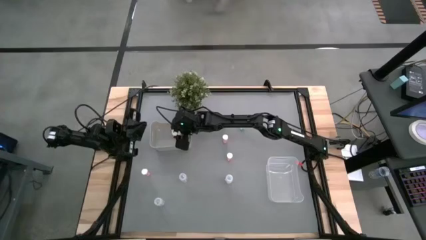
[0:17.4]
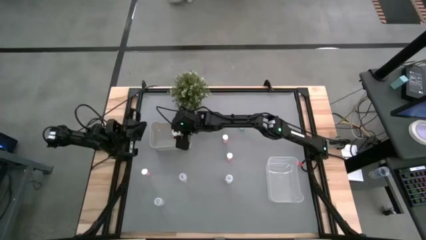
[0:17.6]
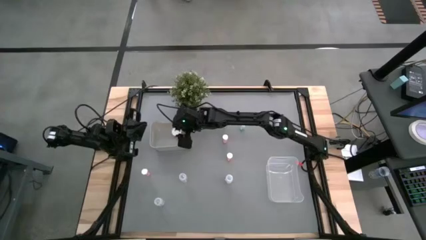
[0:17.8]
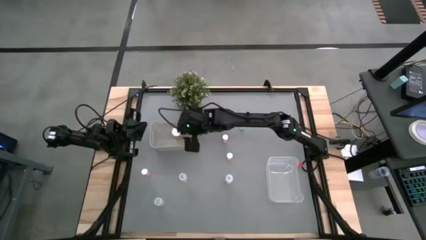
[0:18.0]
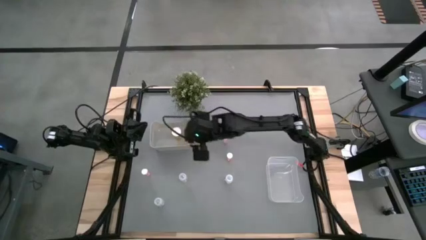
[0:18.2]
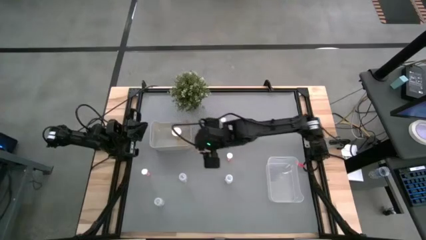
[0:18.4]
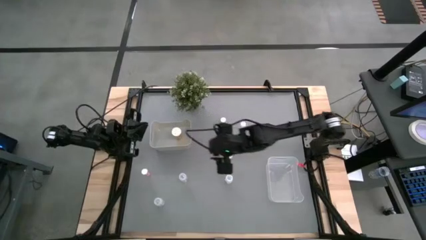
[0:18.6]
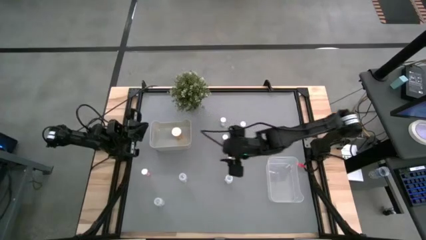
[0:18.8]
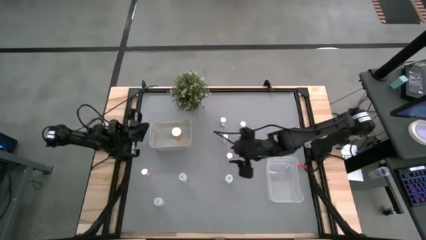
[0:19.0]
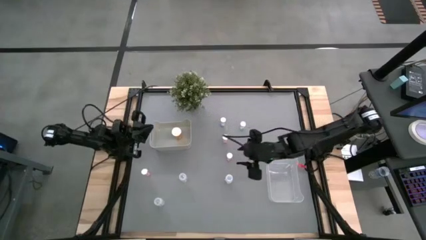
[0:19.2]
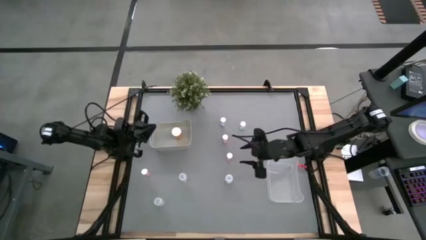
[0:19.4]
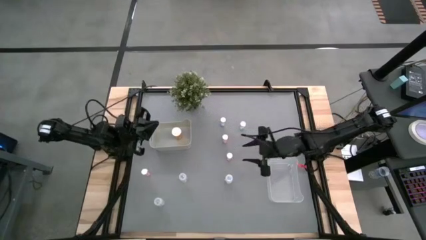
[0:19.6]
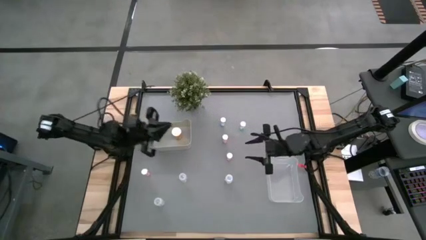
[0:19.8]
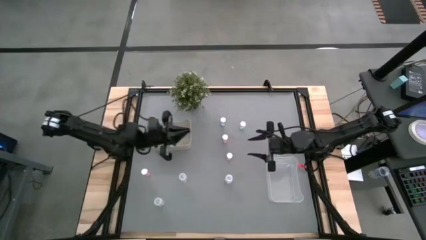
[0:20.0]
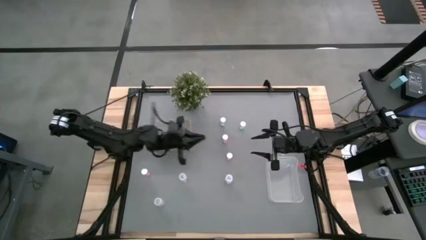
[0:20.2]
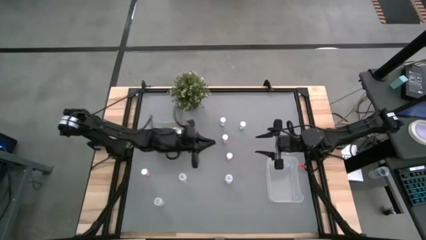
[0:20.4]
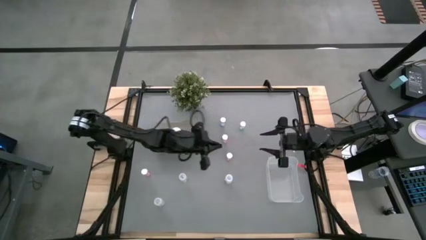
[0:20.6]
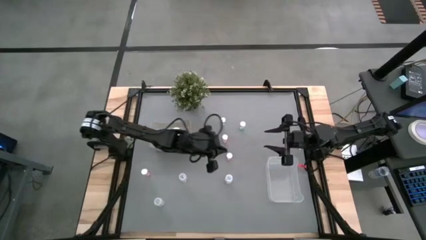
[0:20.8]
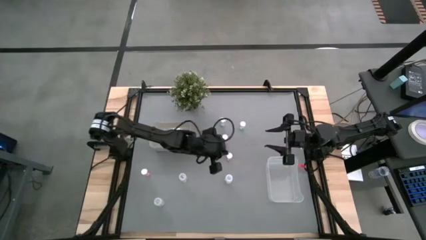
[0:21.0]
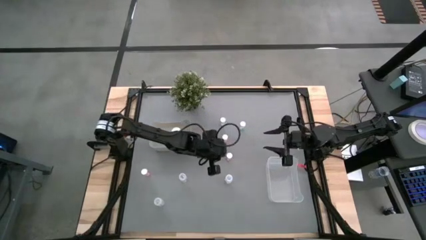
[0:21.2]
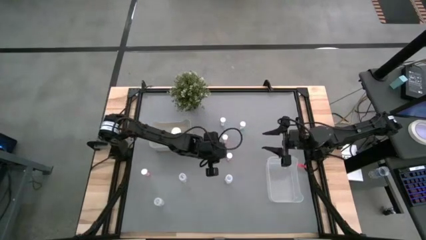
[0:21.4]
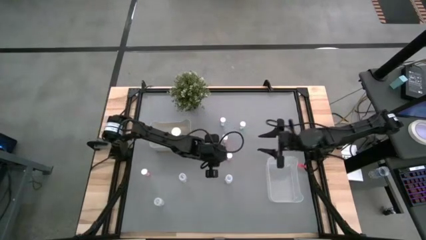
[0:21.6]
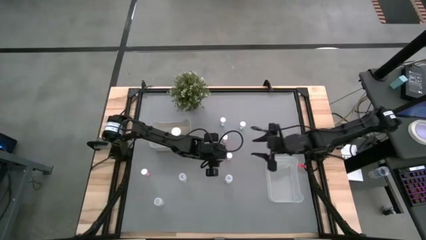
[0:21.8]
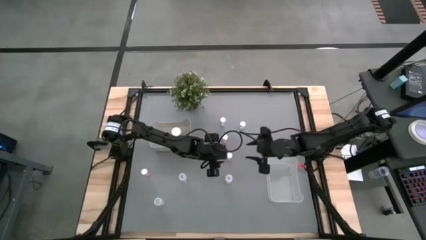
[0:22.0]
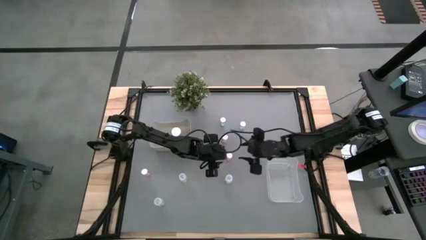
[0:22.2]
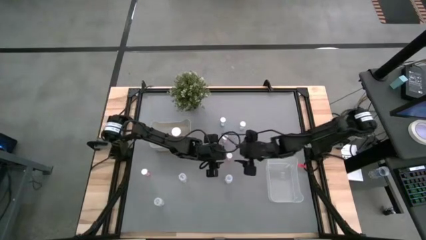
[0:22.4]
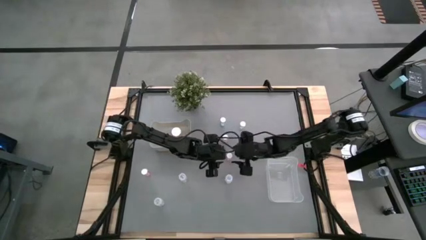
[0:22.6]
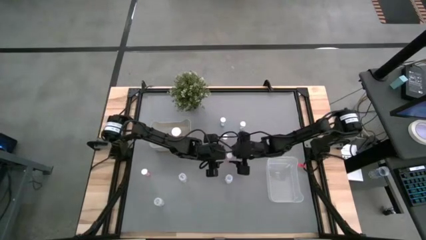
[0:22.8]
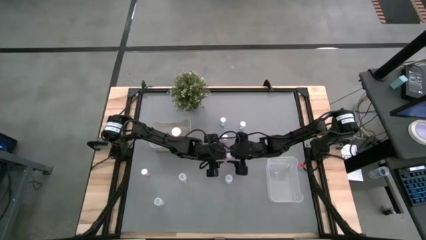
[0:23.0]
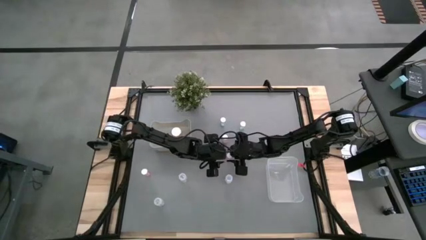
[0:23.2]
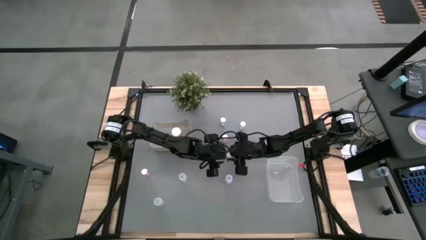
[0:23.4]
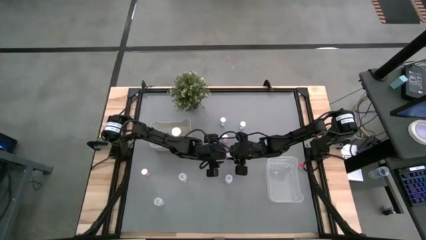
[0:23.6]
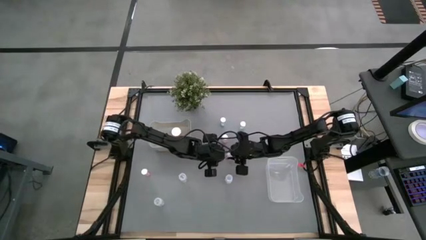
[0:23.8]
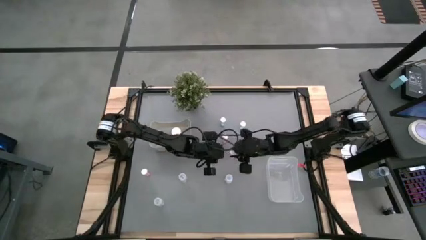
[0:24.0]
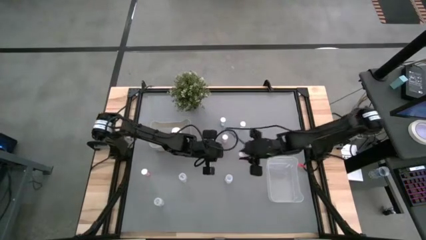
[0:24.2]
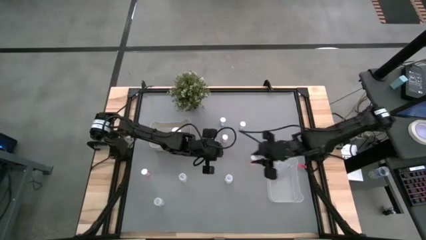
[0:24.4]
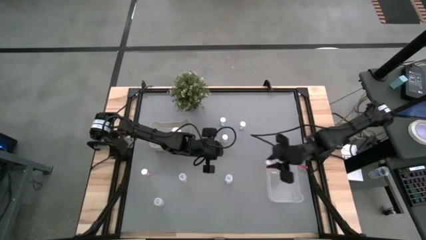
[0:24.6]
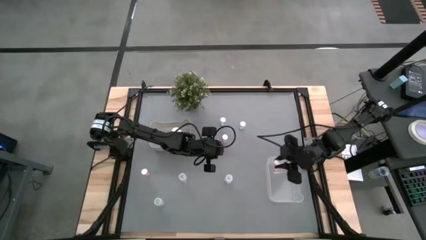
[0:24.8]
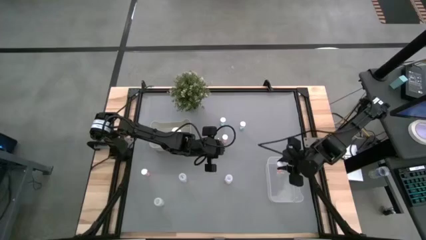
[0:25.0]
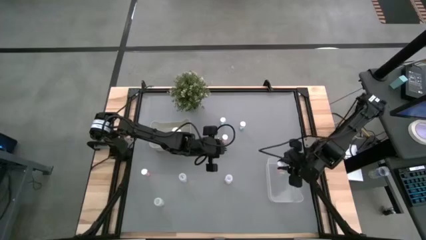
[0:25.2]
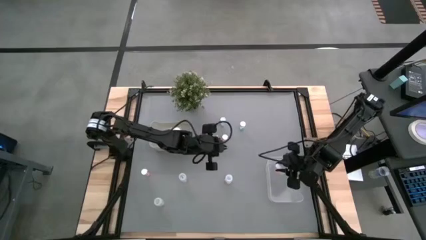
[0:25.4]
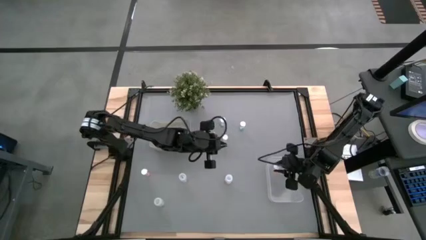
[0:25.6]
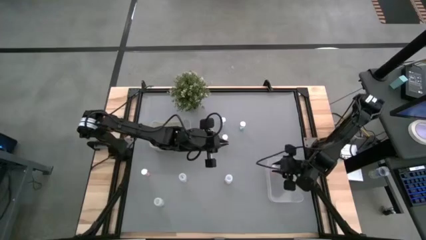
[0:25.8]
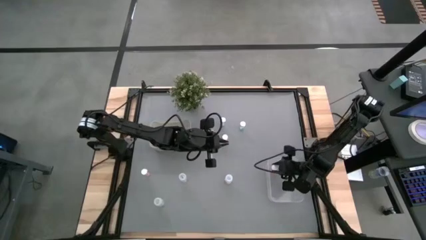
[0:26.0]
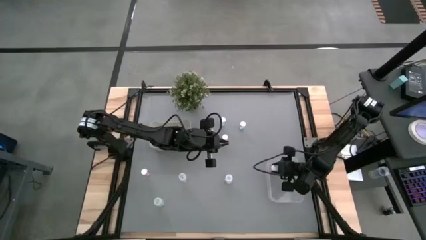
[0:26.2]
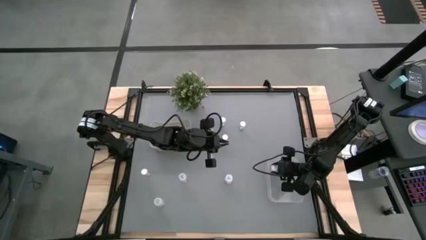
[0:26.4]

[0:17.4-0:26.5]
Task: Pick and place medicine bottles into bin by pill shape (circle, oval)
Put the light pink pill bottle into the transparent bin

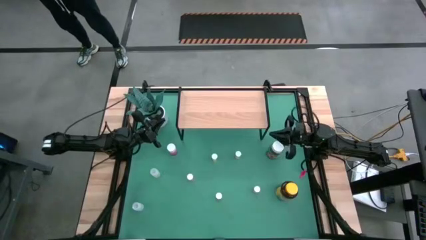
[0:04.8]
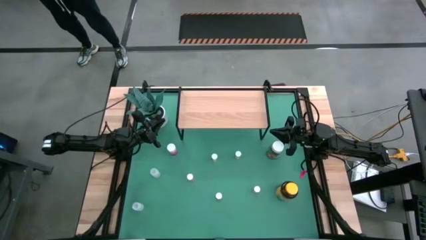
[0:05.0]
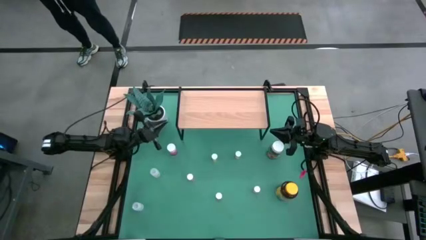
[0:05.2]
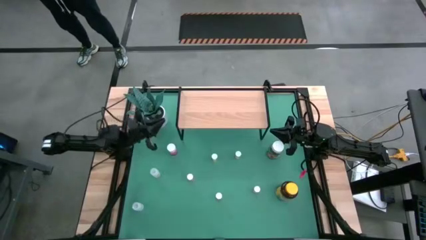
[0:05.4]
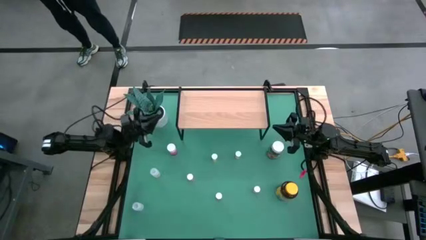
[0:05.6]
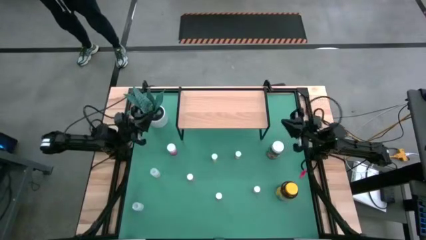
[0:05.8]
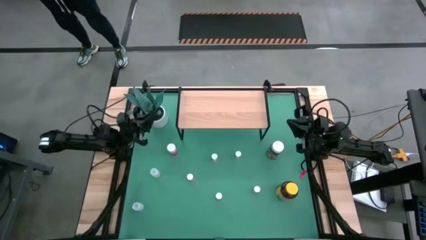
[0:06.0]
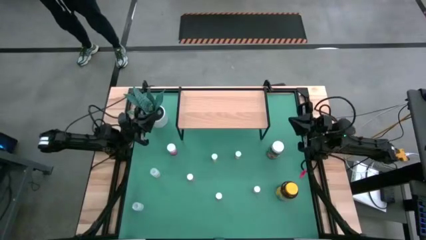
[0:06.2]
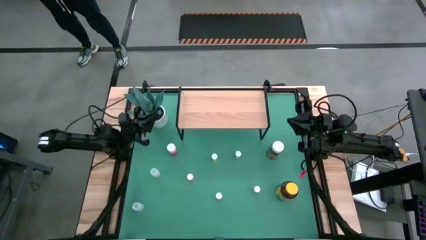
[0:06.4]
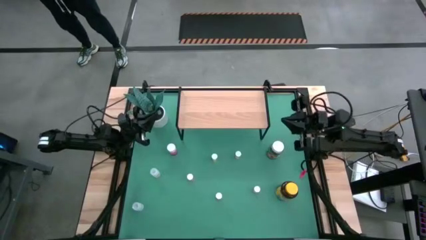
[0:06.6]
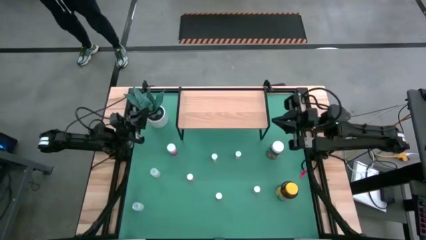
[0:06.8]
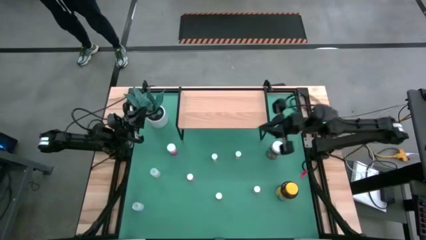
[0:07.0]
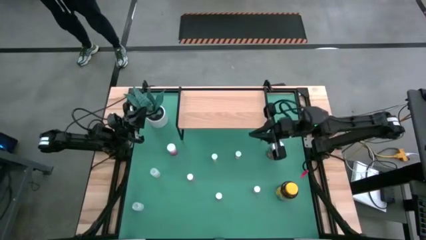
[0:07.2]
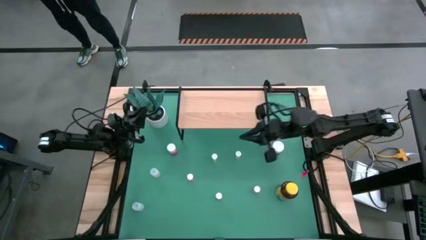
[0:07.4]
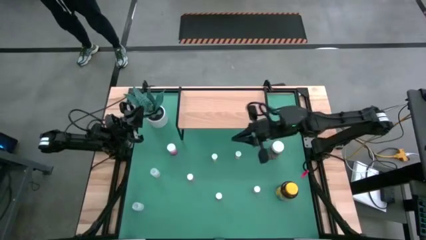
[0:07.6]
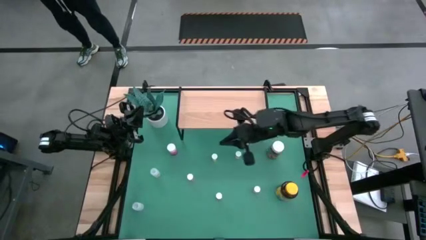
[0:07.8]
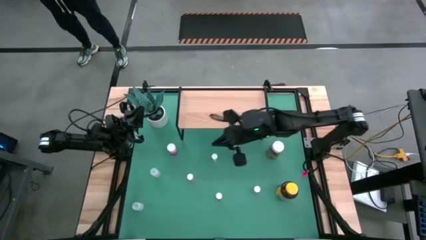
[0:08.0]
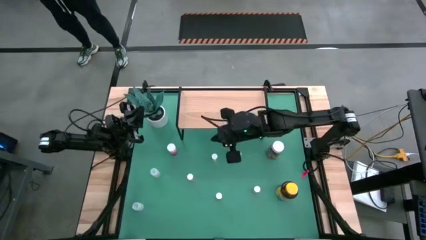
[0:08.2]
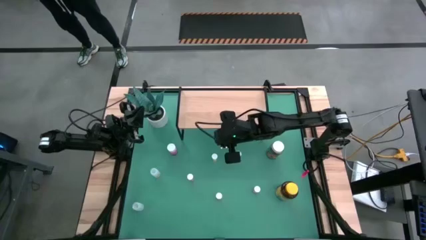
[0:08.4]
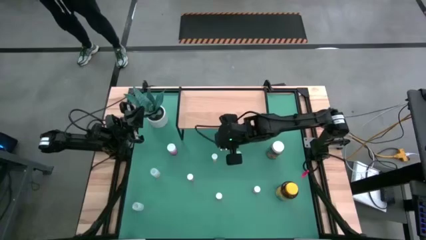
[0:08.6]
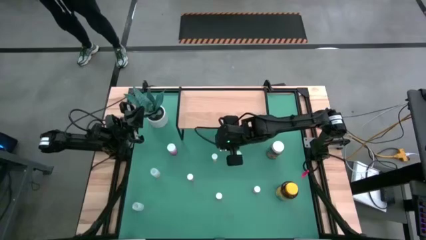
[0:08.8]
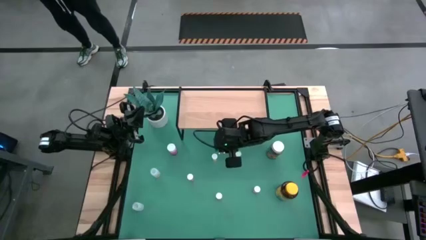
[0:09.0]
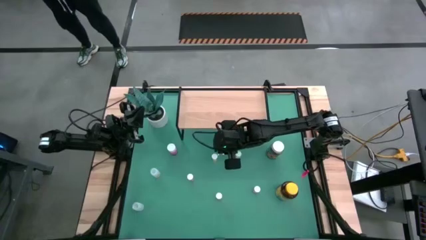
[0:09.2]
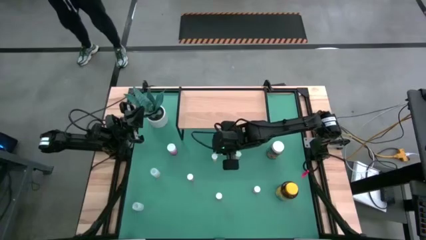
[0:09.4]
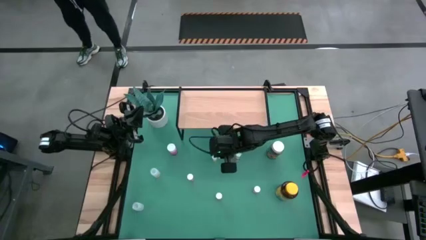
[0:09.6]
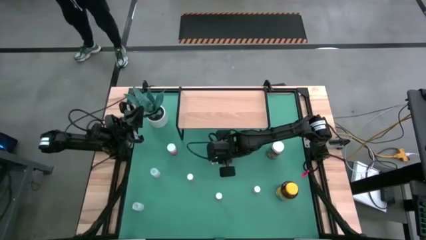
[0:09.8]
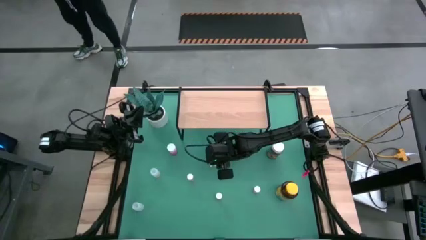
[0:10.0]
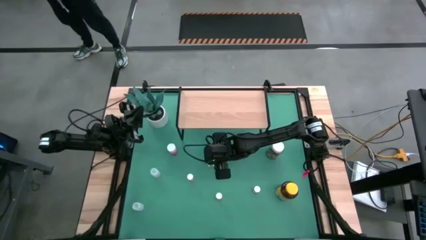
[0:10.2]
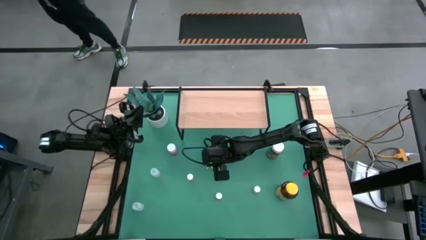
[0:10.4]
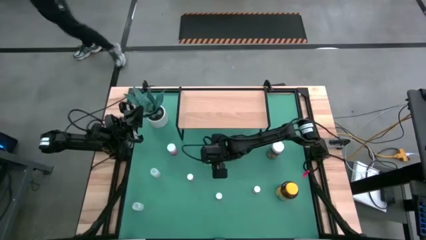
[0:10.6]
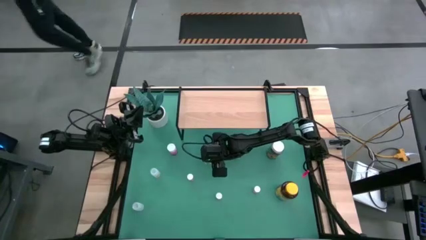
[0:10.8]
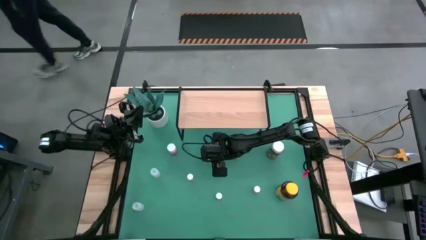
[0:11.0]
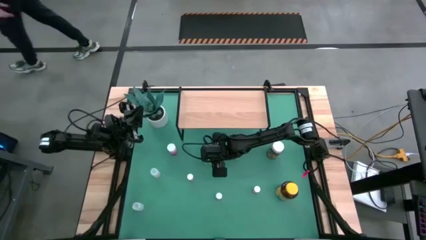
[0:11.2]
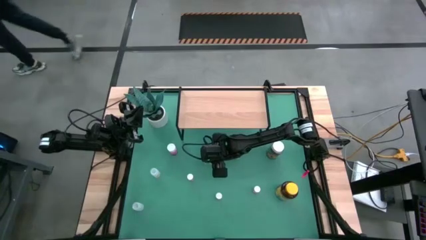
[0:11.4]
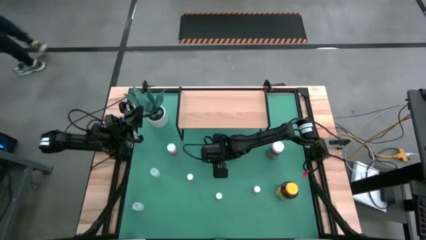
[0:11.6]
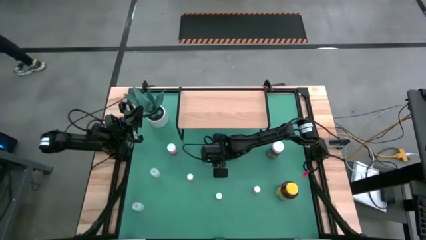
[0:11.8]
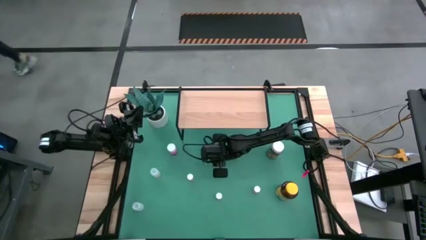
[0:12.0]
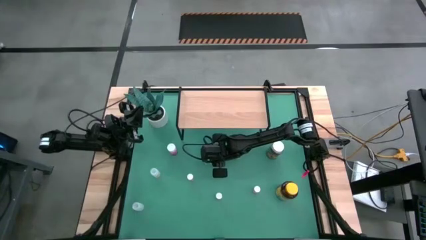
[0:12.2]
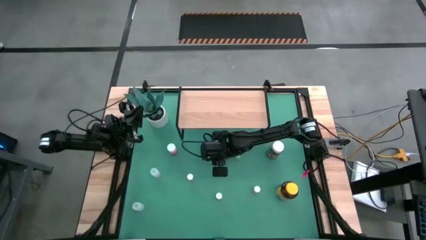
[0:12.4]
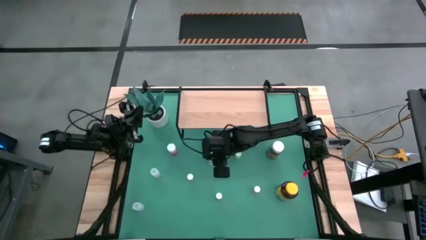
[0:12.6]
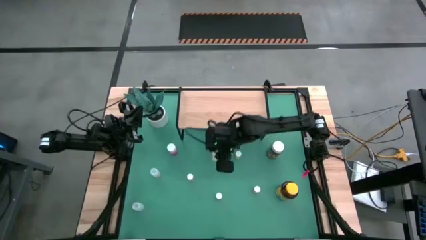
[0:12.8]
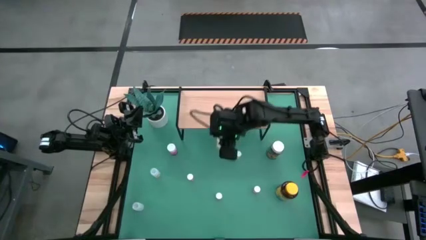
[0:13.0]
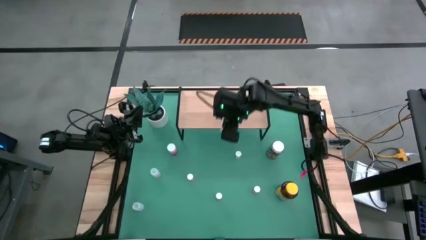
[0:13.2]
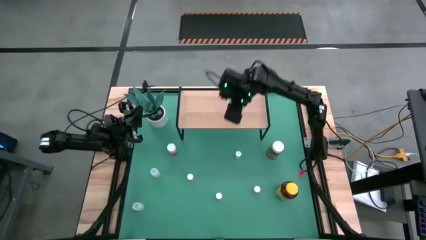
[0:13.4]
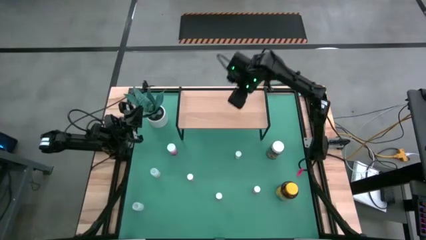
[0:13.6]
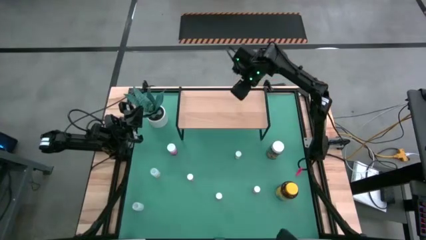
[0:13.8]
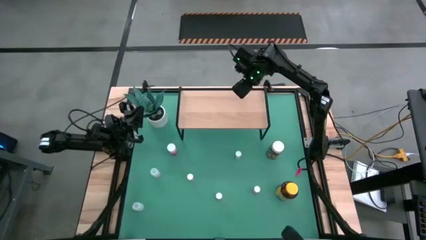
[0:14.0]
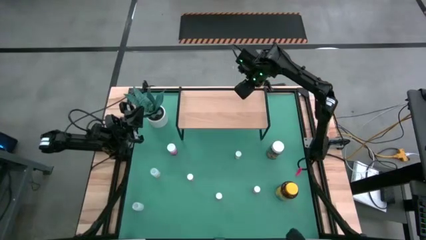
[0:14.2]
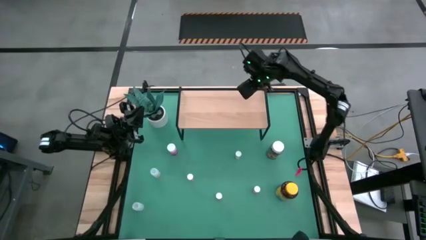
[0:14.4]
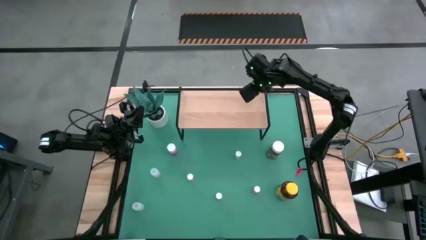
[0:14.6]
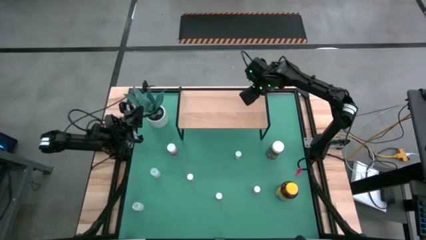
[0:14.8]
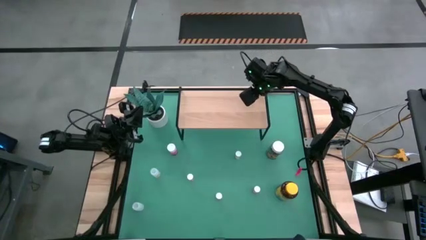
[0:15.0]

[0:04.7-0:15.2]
Task: Pick and place medicine bottles onto shelf by color
Put the left yellow pill bottle on the shelf
